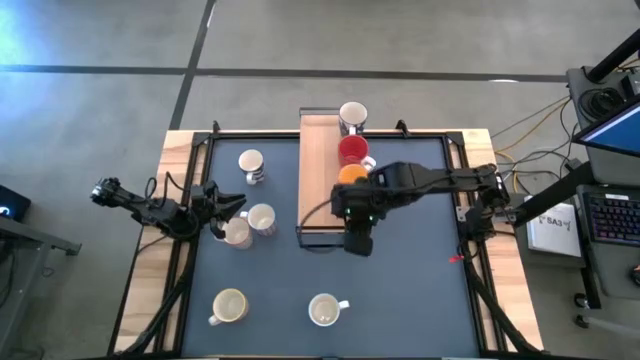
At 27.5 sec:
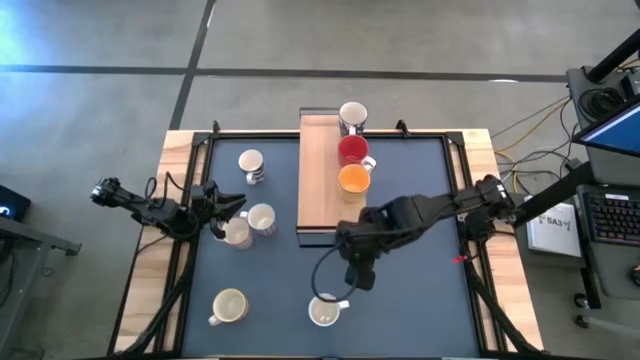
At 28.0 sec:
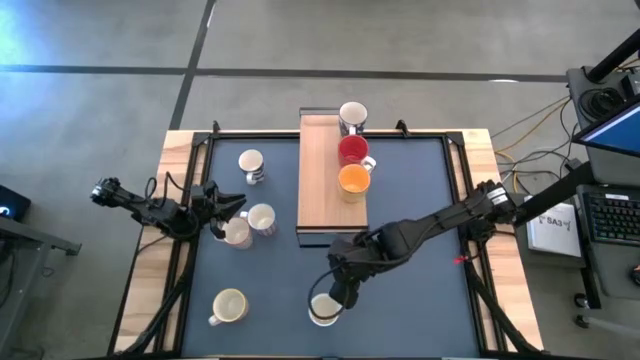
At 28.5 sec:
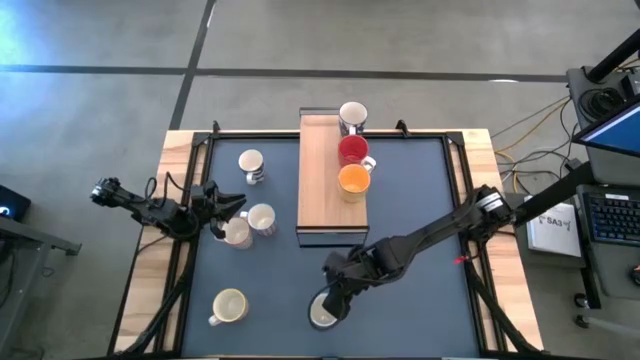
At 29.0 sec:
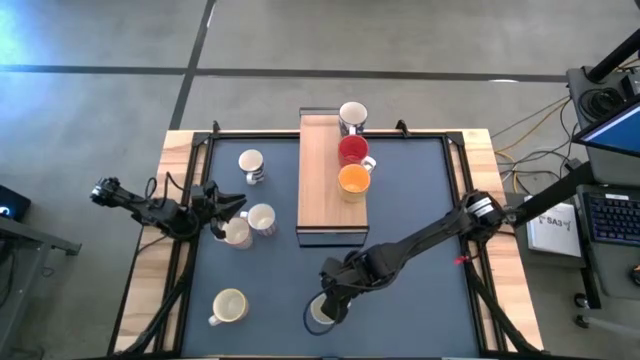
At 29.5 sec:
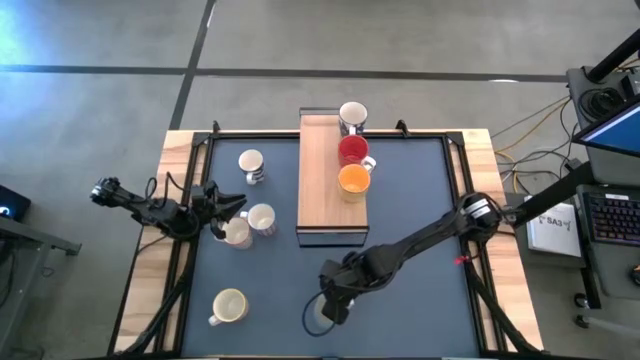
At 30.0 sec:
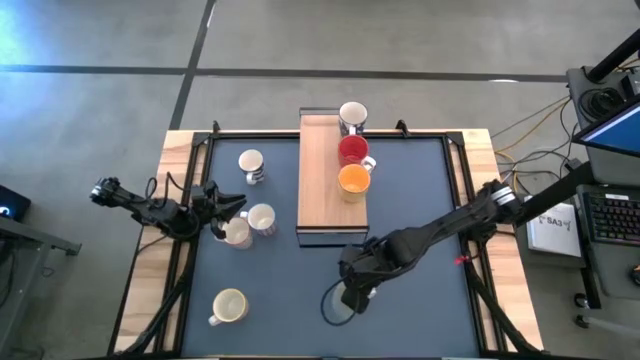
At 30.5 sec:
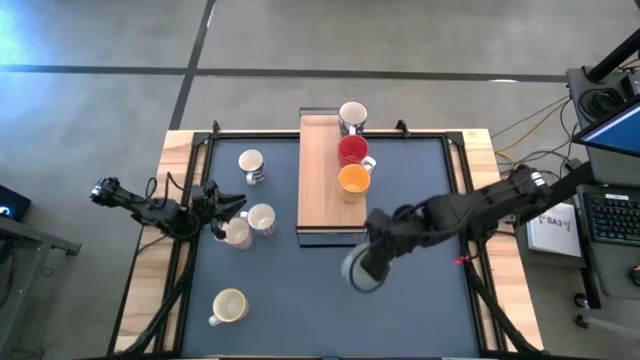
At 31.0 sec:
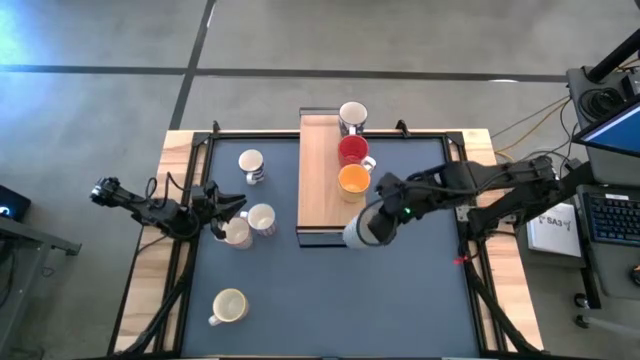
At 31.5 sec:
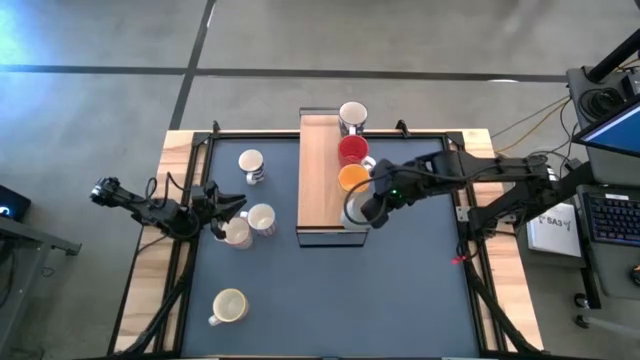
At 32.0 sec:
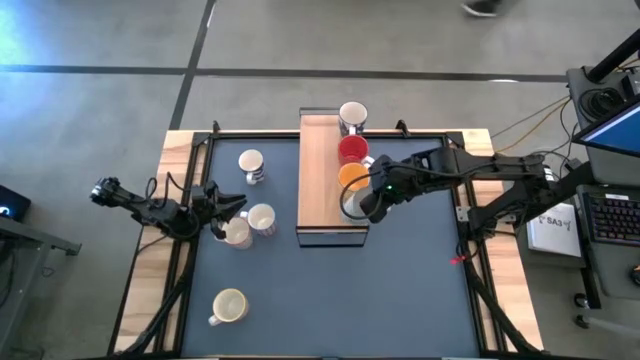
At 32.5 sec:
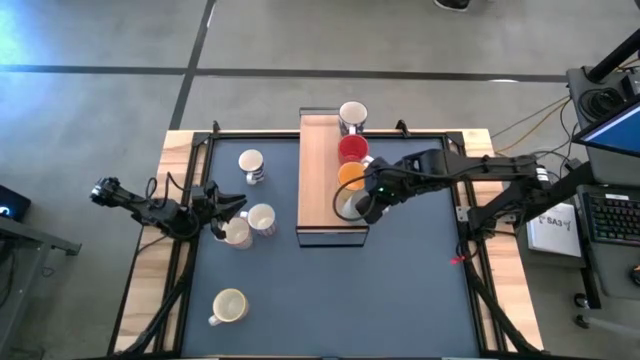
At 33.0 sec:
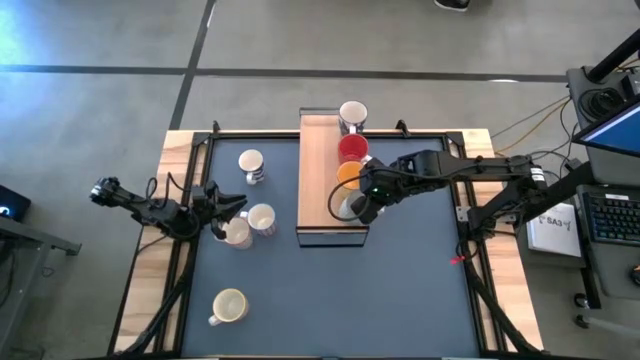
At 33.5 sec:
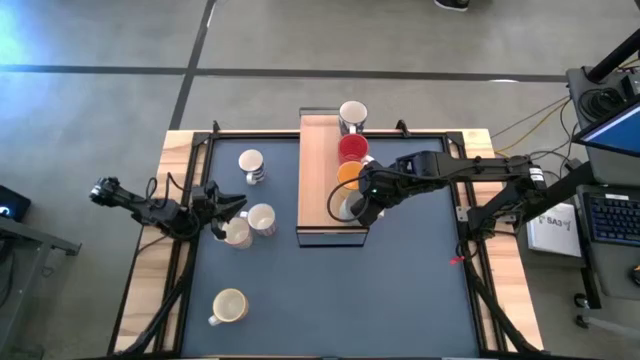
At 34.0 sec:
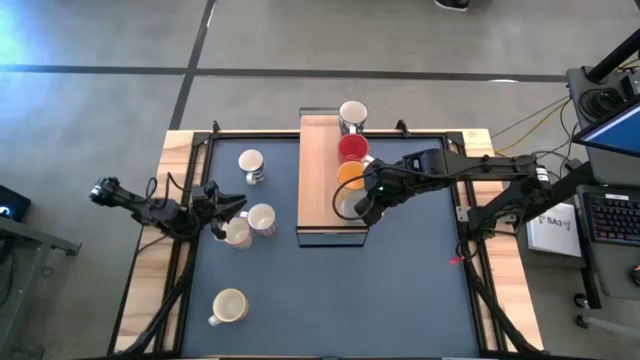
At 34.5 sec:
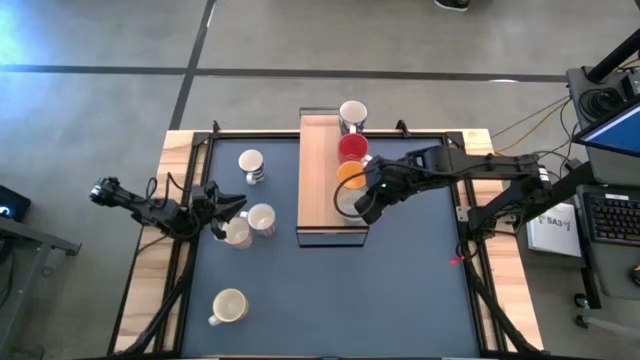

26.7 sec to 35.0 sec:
Task: Place coffee mugs
Put the green patterned mug on the shelf

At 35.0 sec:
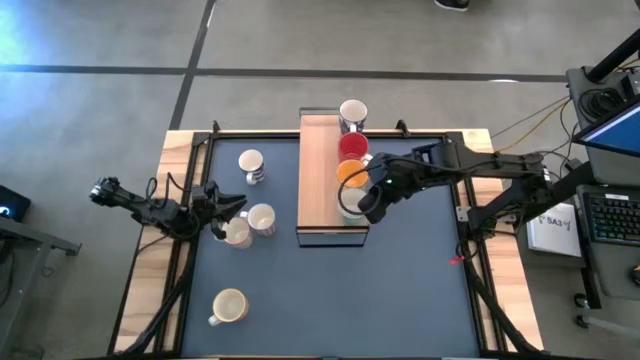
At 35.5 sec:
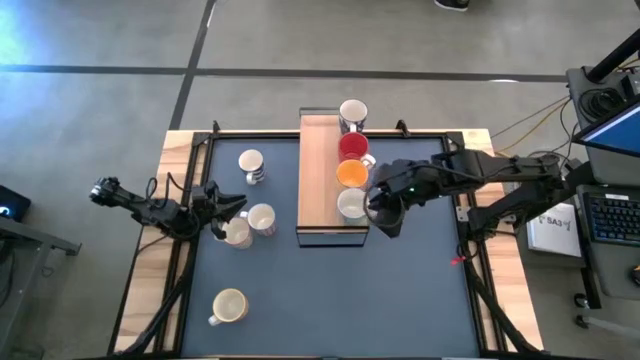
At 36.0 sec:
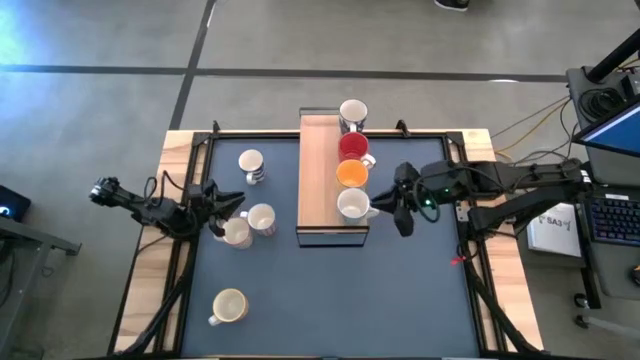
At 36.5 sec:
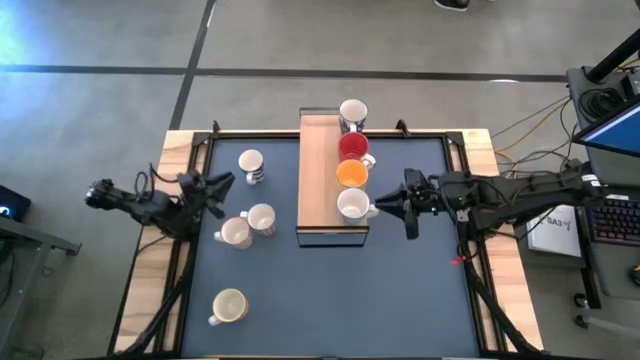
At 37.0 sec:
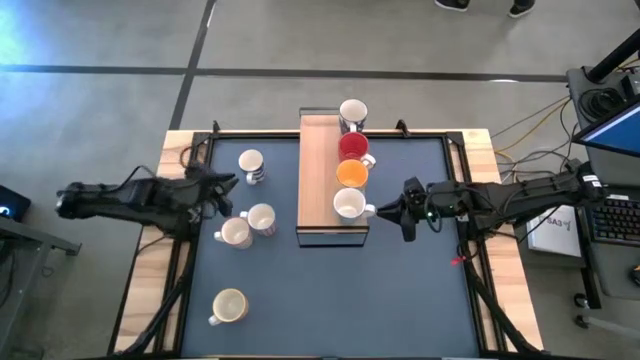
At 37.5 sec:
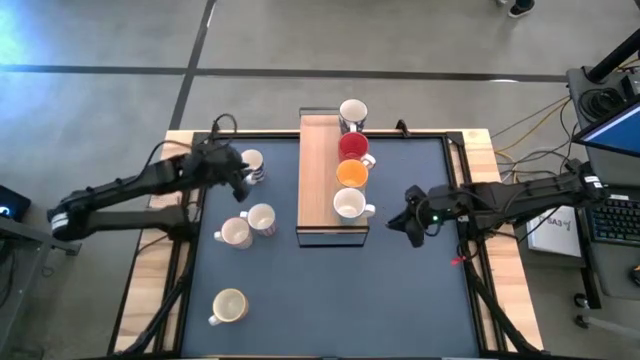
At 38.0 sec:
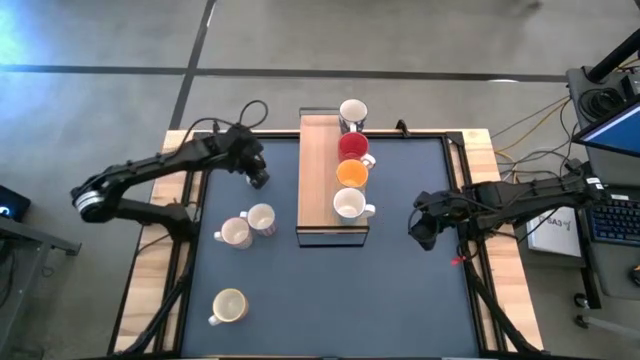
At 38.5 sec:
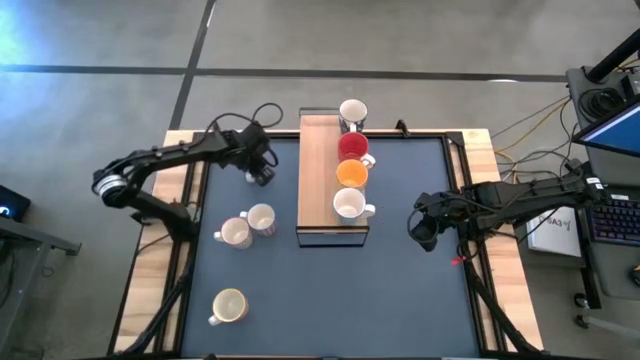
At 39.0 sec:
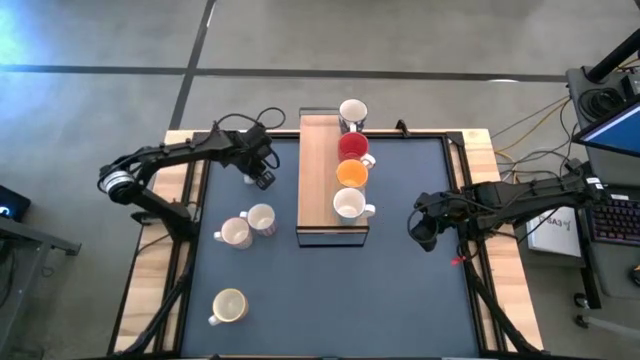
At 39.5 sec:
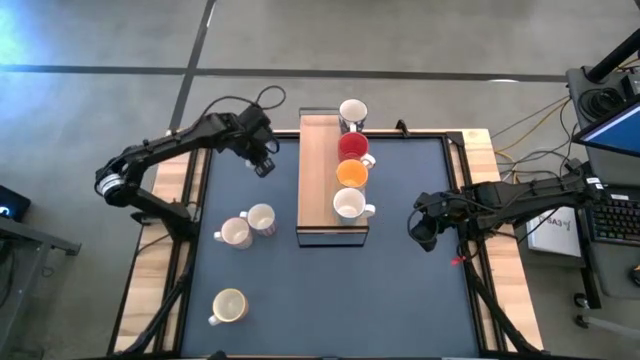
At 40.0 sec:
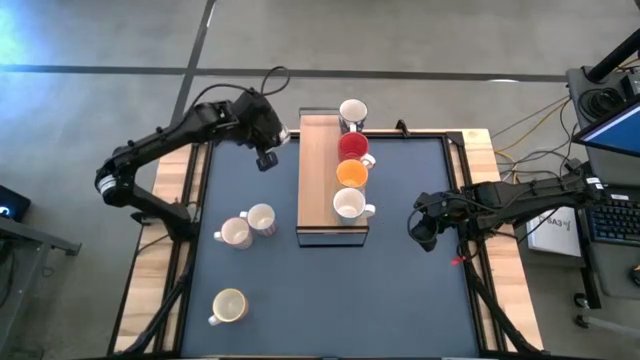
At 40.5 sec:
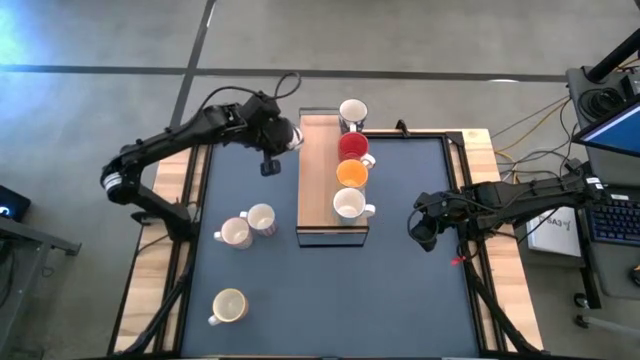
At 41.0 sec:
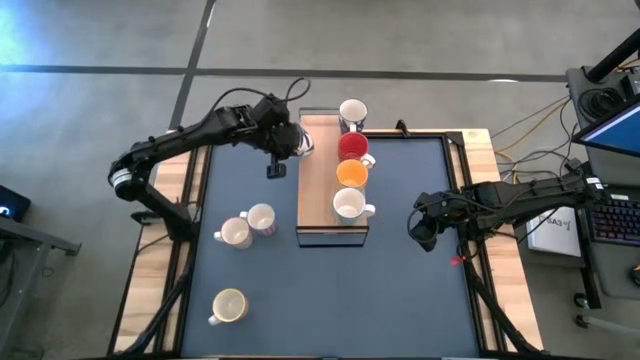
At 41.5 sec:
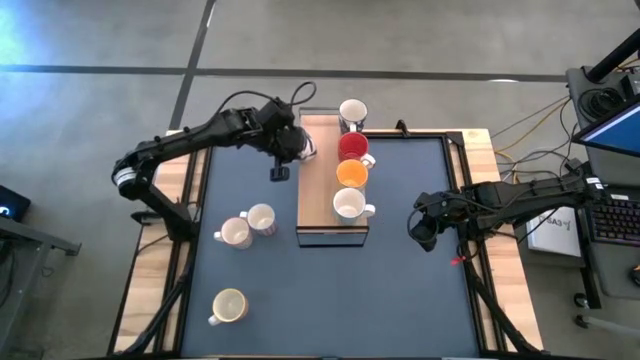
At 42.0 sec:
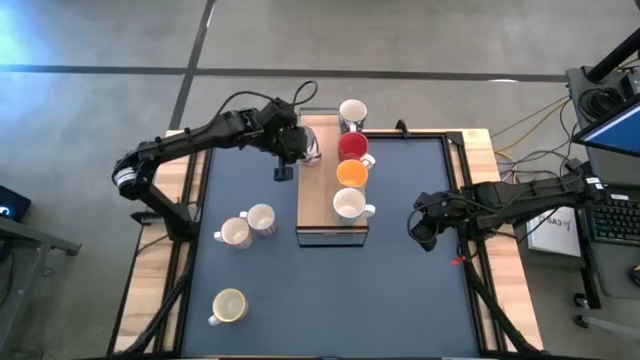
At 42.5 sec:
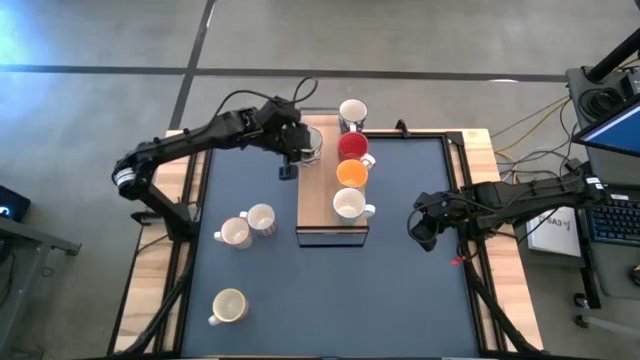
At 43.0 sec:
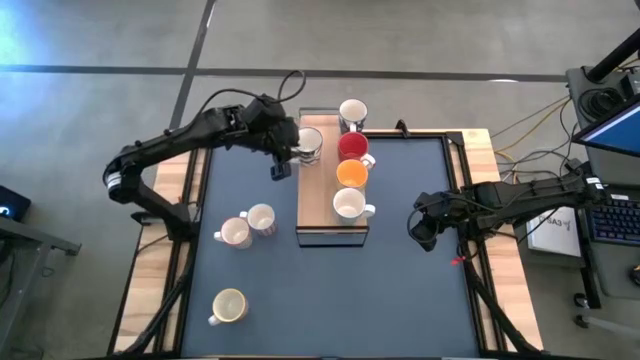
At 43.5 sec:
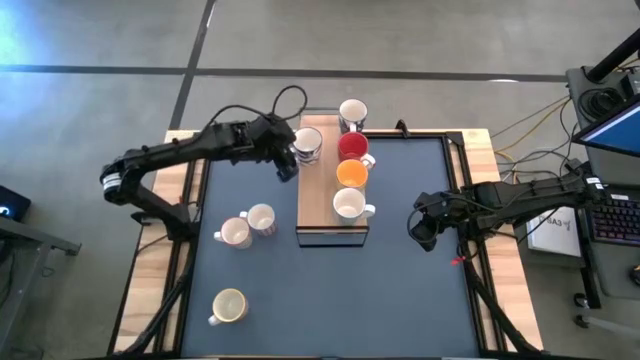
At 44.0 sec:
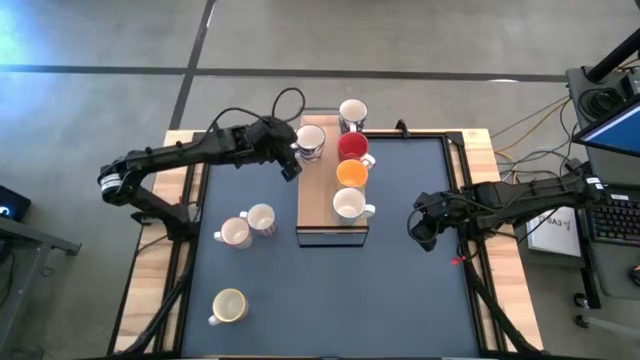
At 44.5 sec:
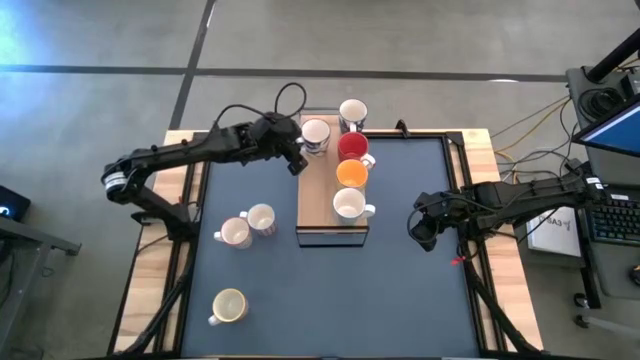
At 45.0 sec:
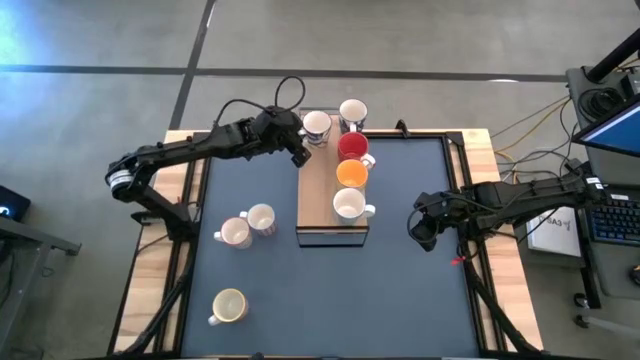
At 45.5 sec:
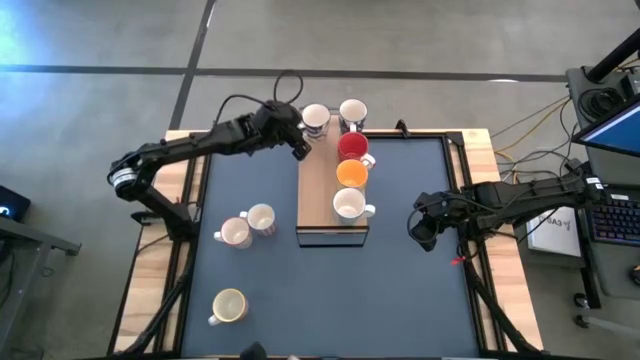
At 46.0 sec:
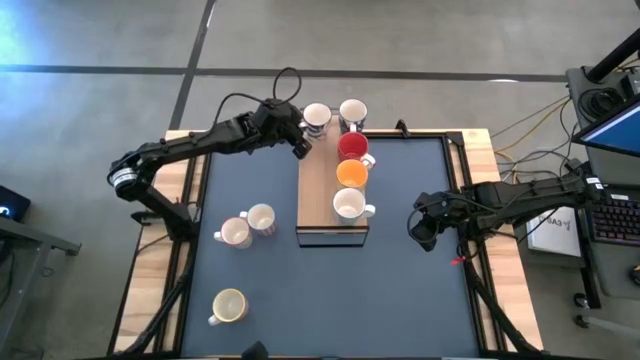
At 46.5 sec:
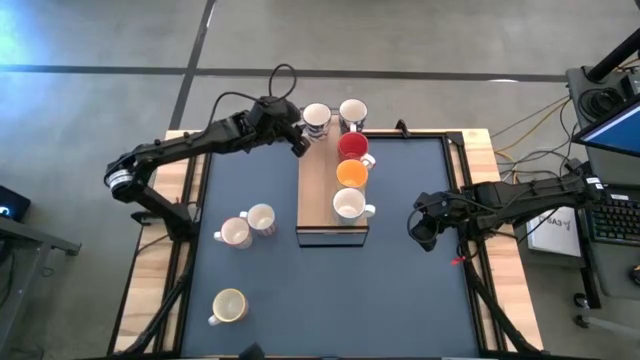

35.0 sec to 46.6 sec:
Put the blue patterned mug on the shelf
